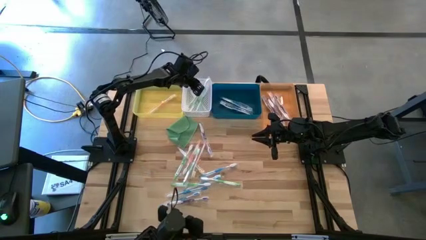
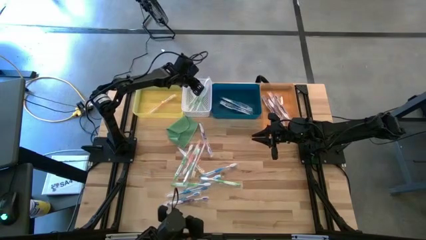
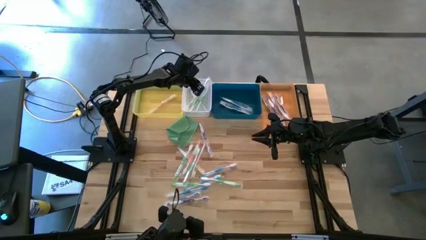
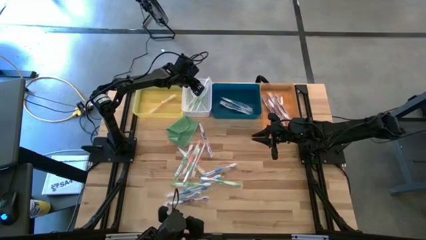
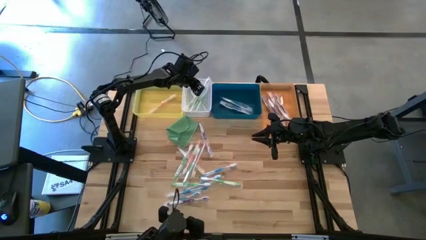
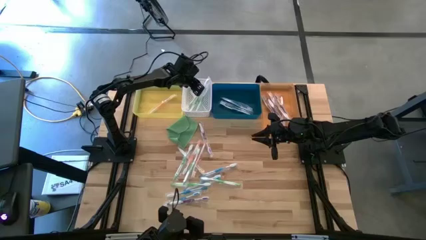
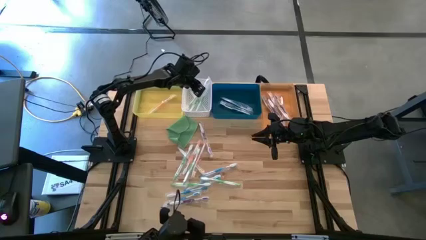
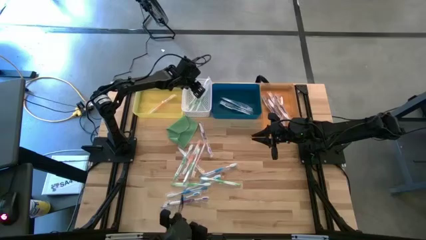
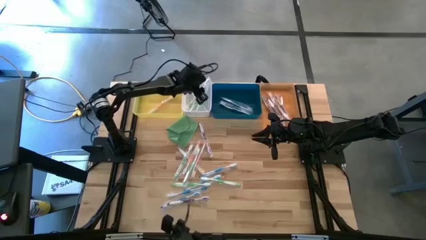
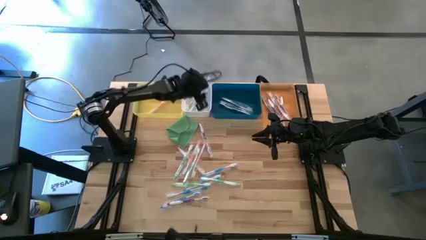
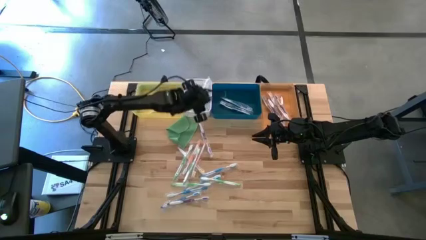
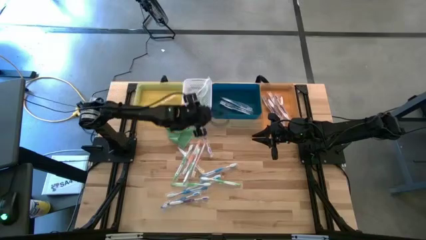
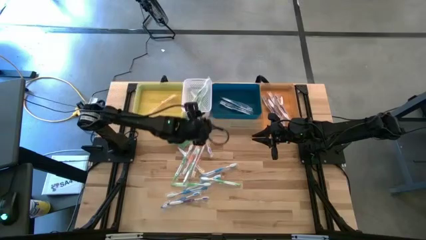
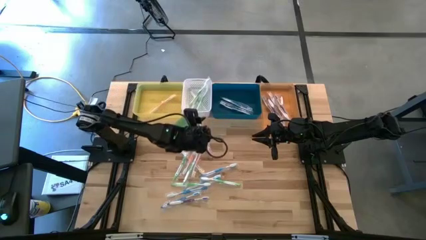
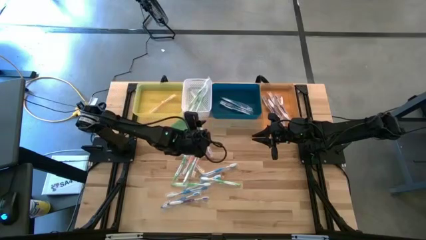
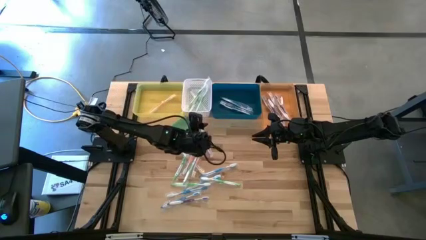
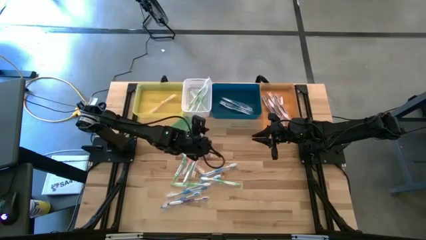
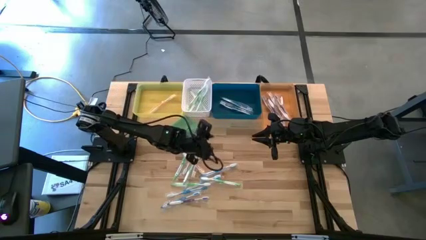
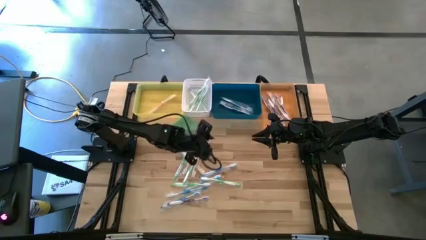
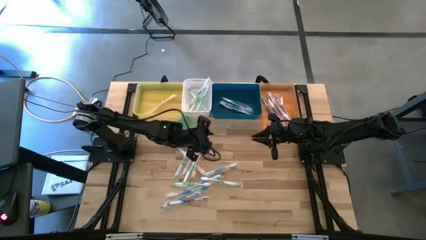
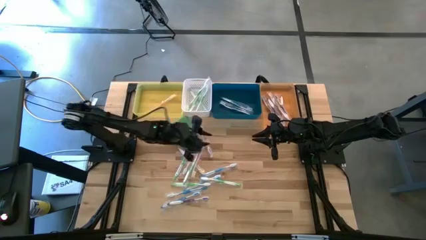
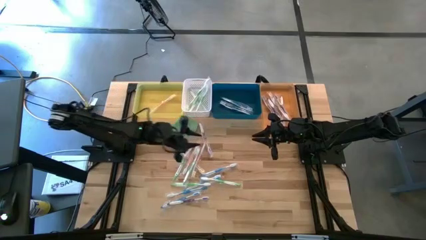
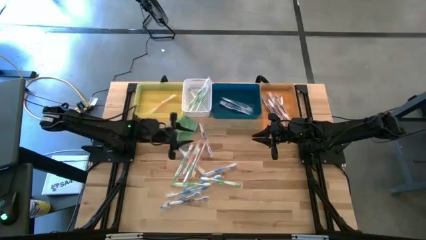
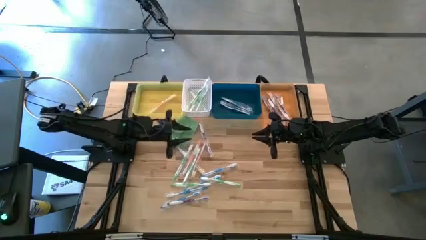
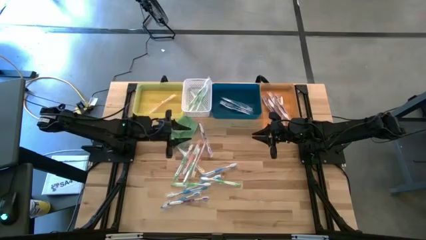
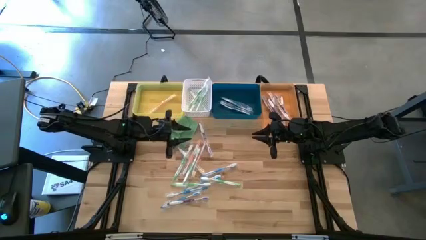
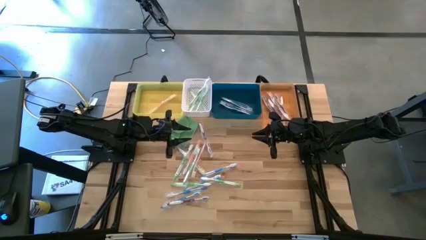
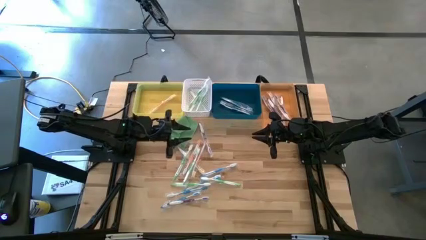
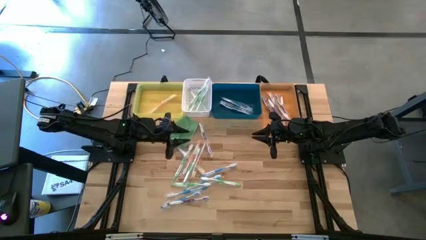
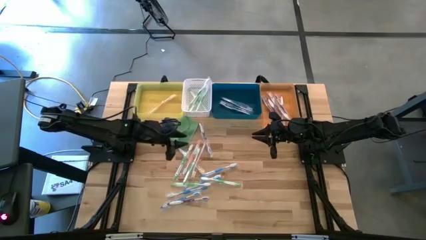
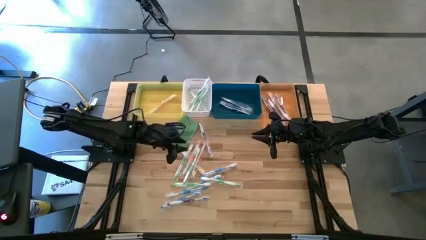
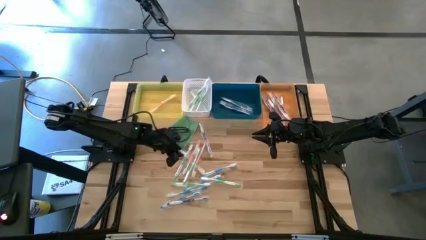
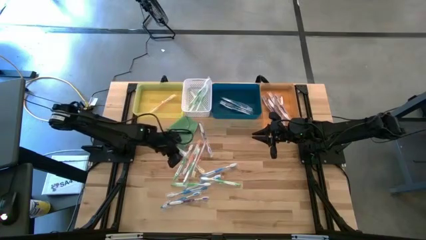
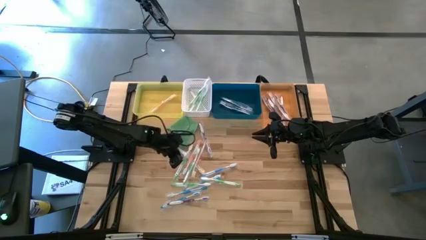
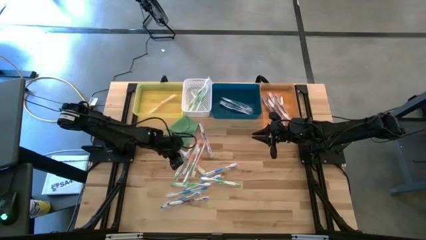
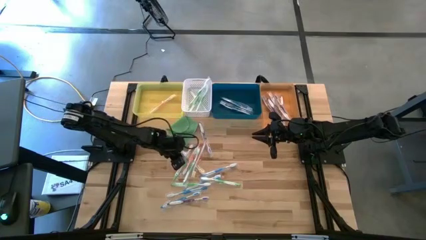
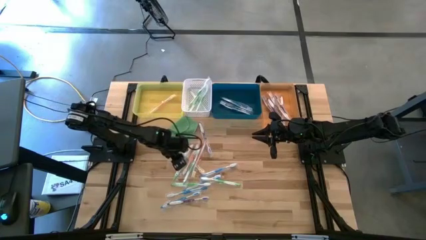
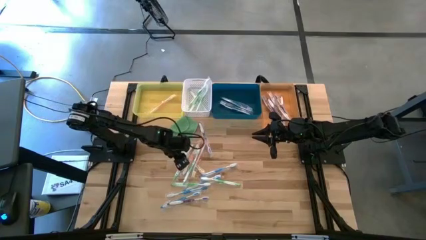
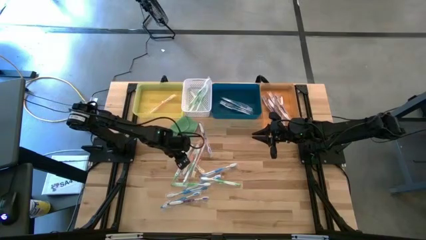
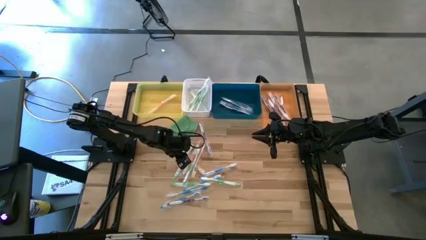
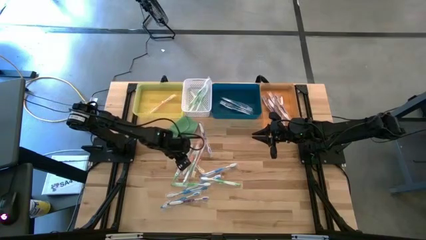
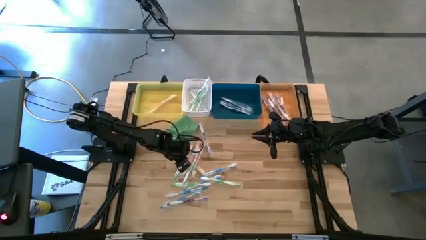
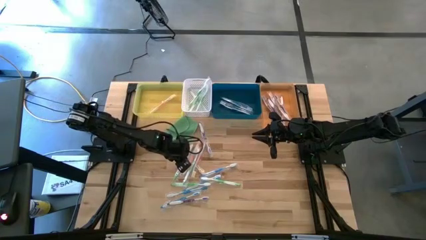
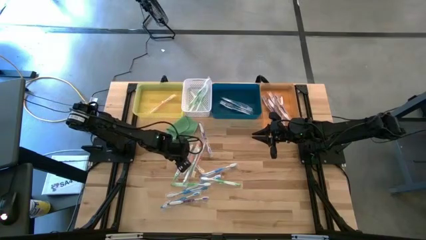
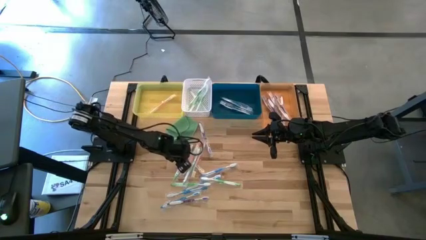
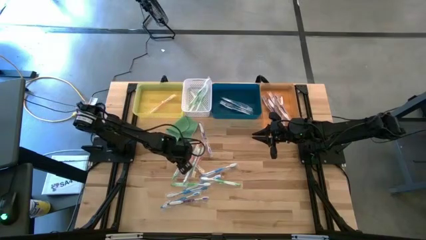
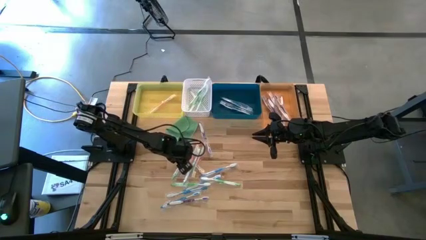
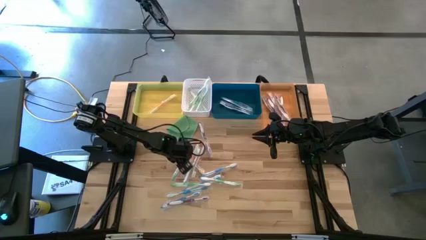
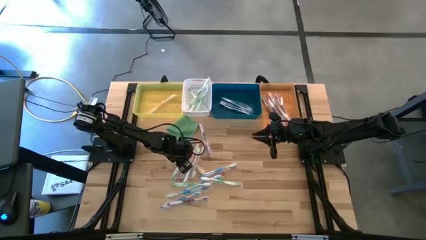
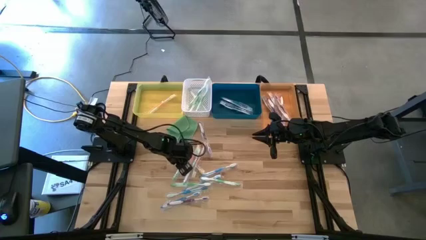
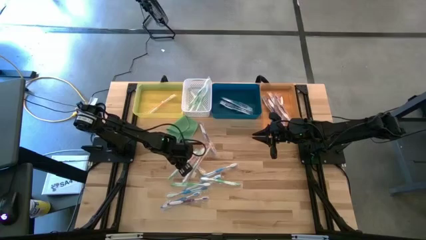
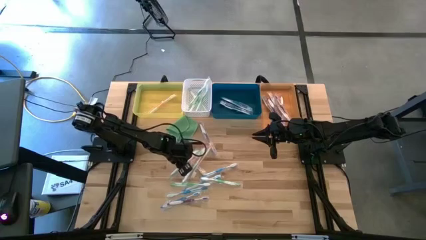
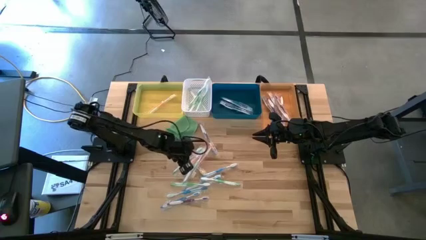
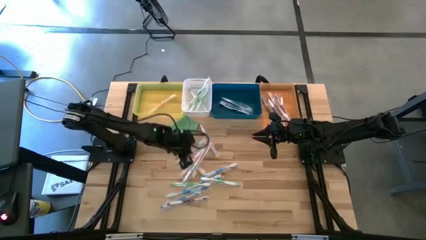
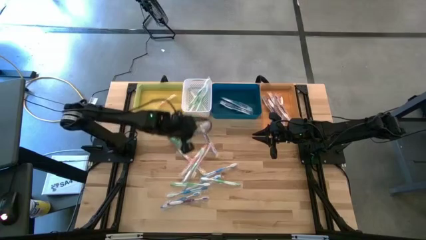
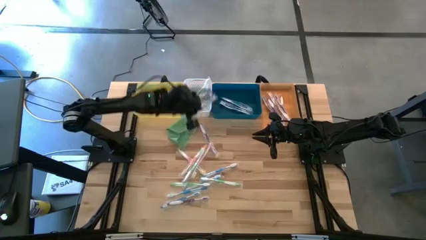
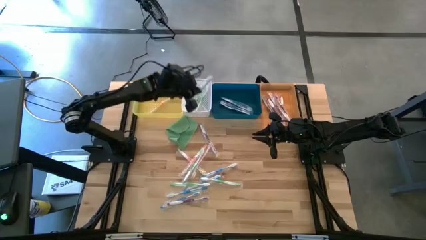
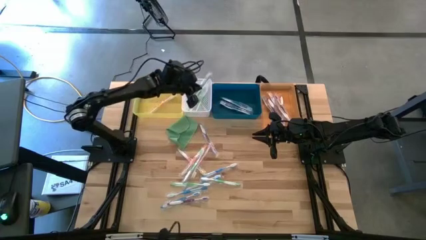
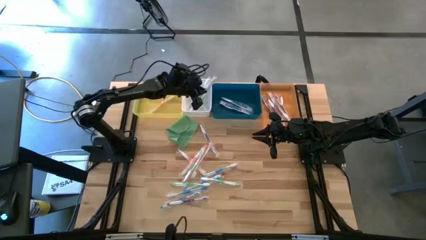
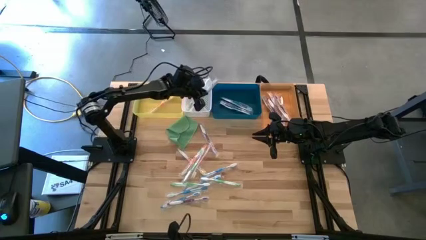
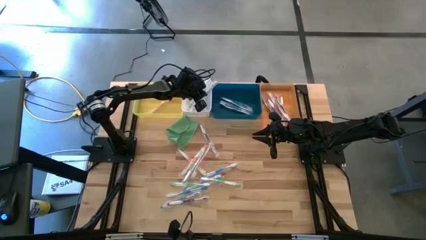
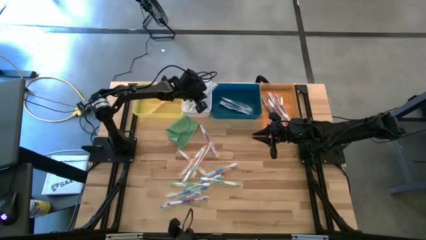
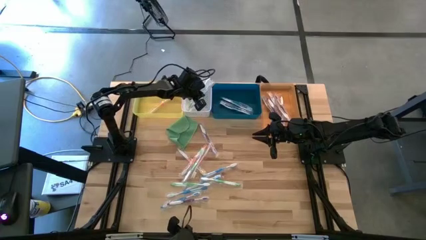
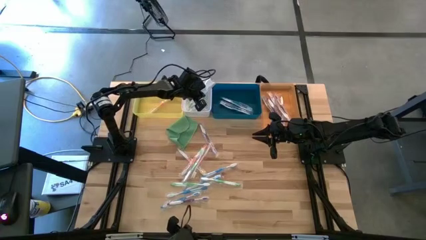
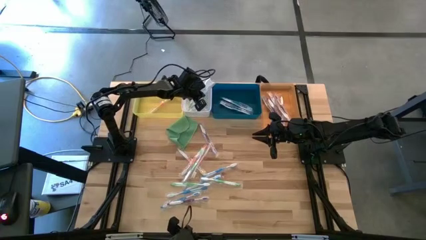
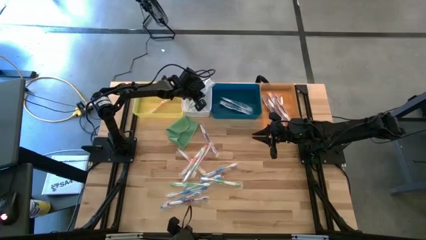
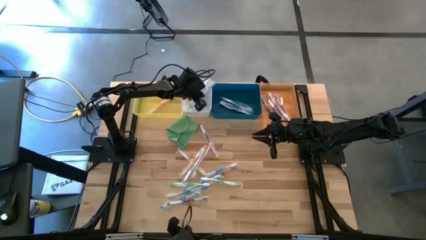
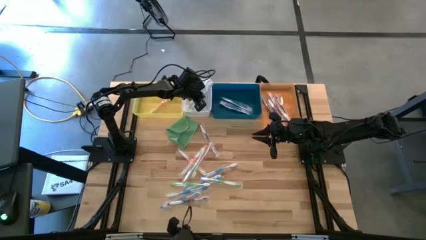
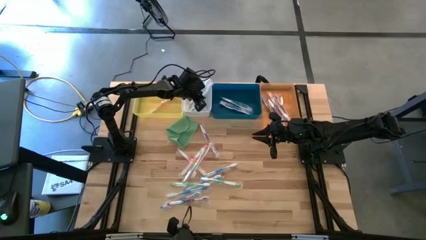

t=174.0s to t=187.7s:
Task: Pick & Place Toothbrushes
Put the green toothbrush into the white bin

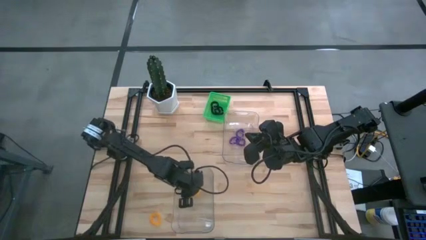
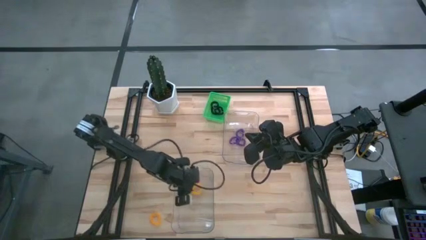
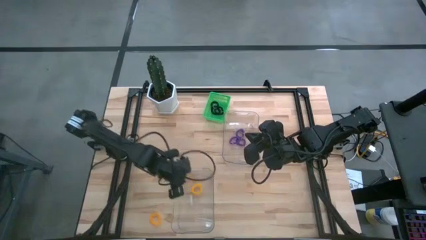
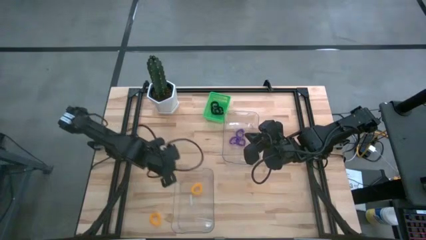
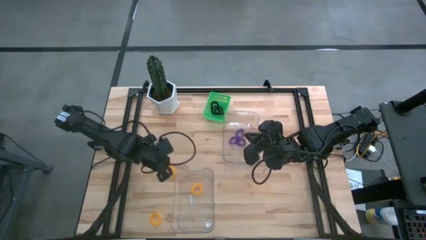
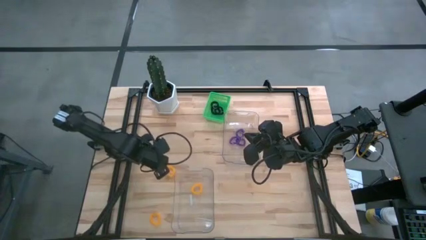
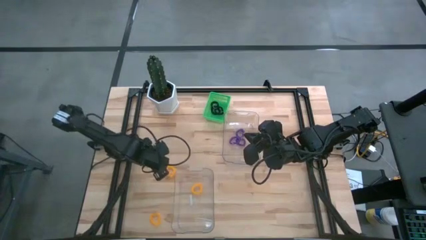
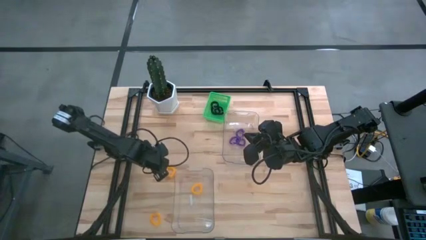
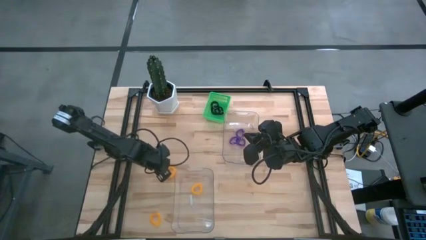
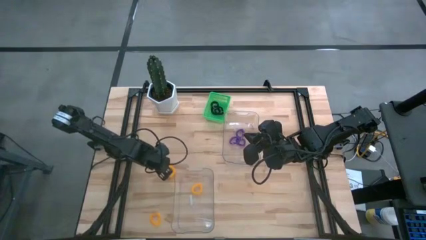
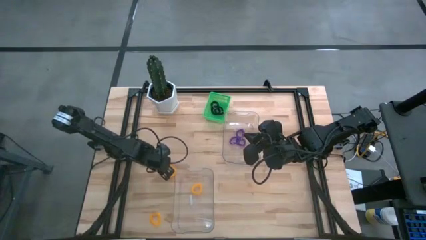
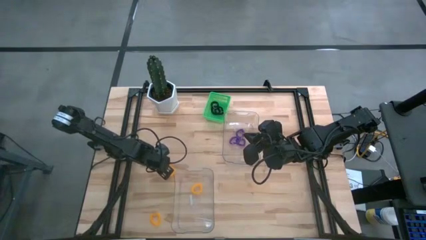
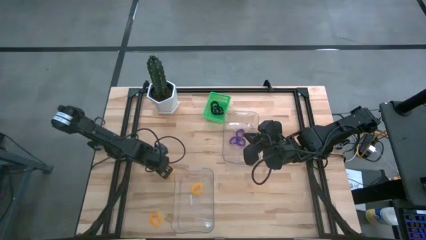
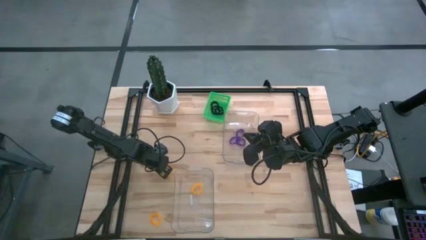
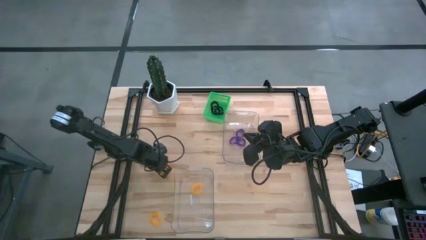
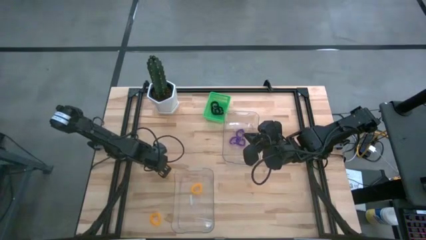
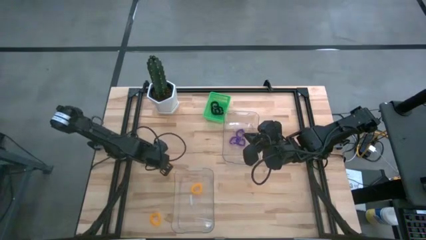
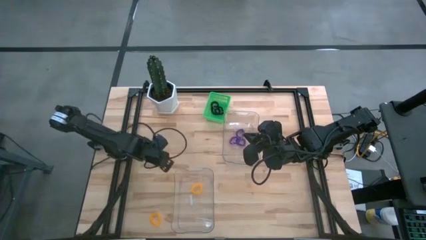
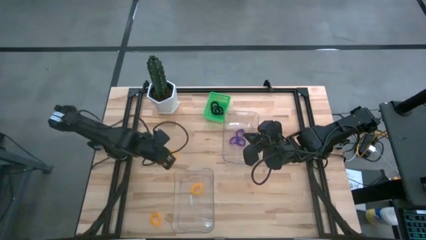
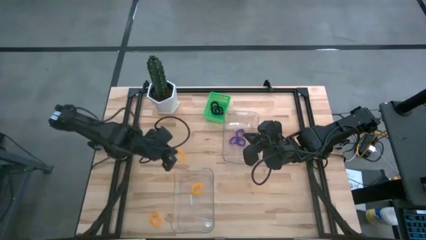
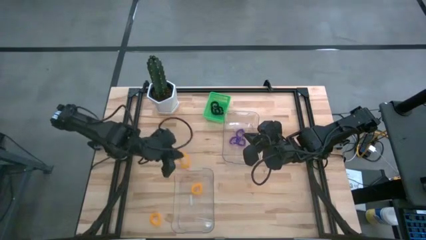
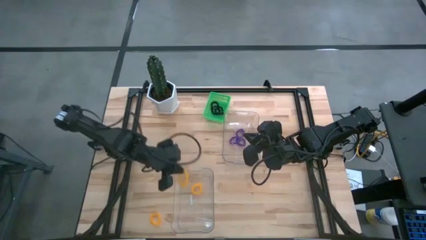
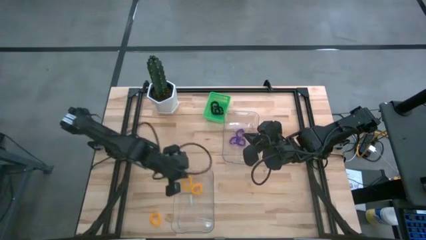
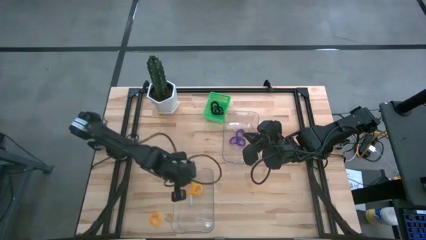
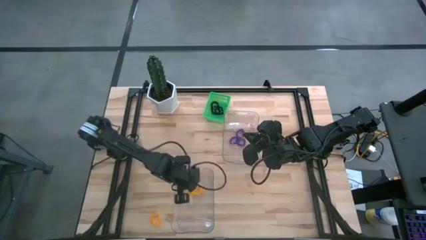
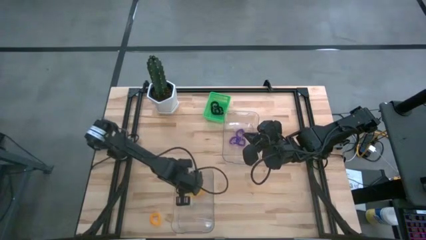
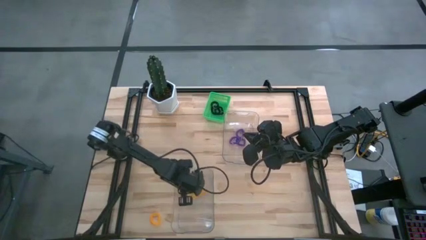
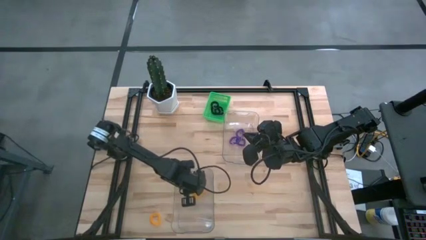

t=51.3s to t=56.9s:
Task: Sort spring keychains
Put the top yellow spring keychain into the bottom transparent bin
